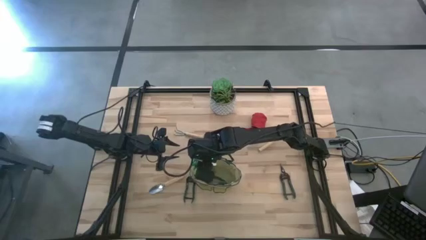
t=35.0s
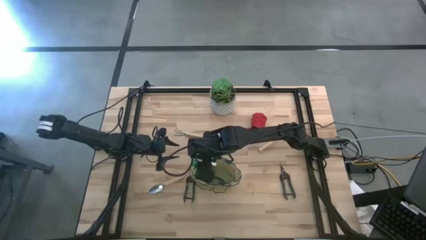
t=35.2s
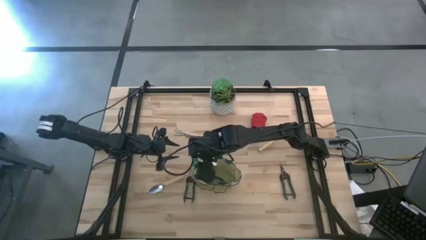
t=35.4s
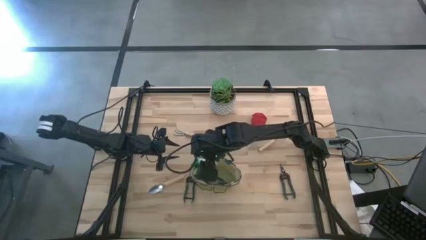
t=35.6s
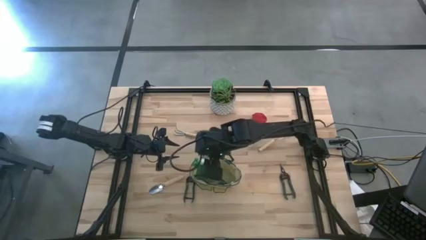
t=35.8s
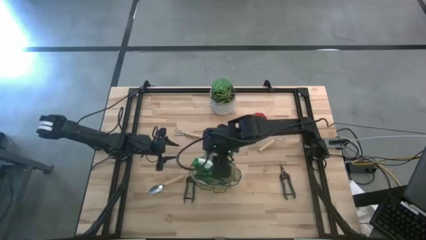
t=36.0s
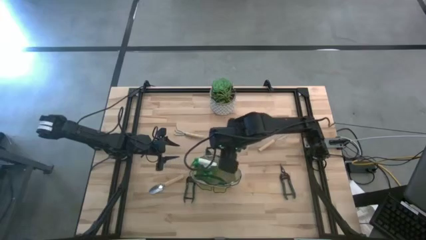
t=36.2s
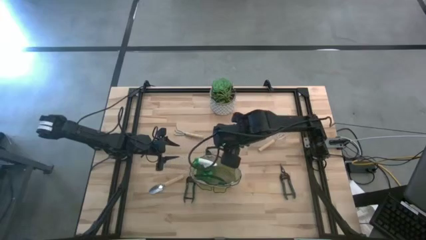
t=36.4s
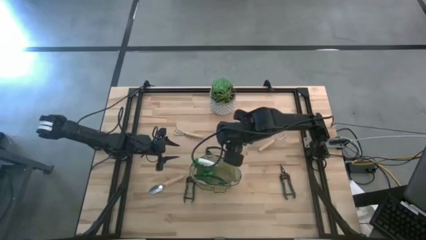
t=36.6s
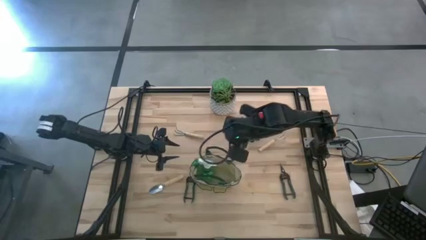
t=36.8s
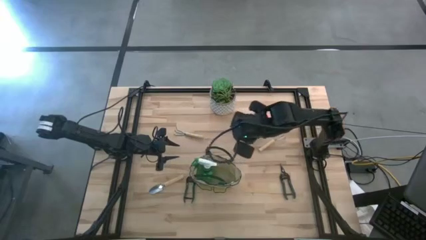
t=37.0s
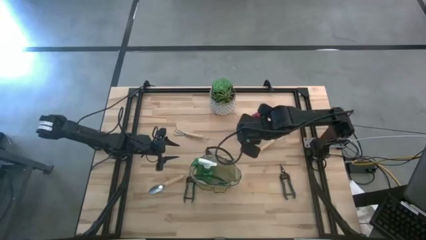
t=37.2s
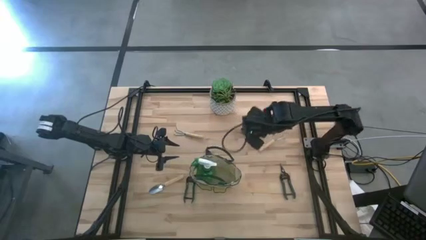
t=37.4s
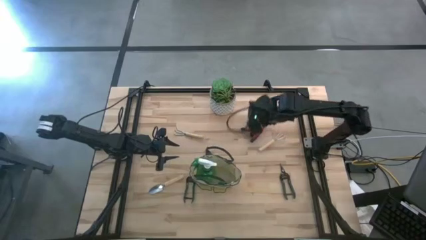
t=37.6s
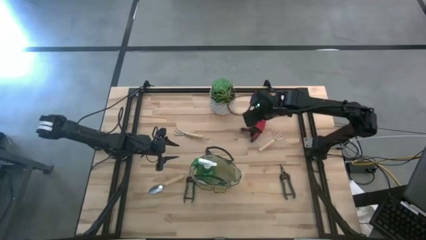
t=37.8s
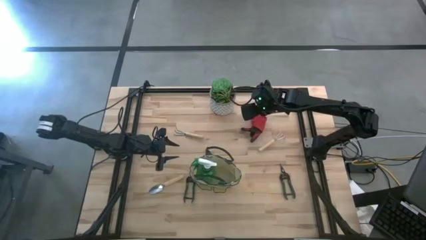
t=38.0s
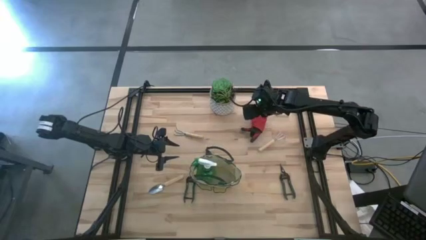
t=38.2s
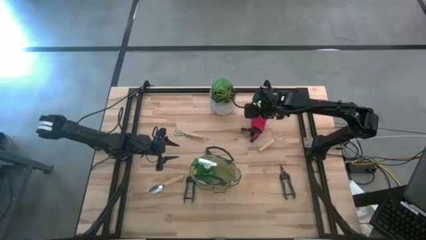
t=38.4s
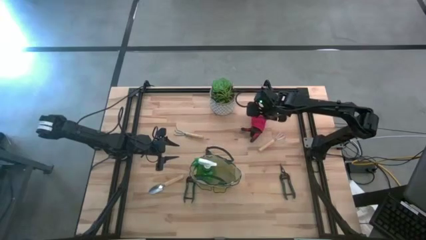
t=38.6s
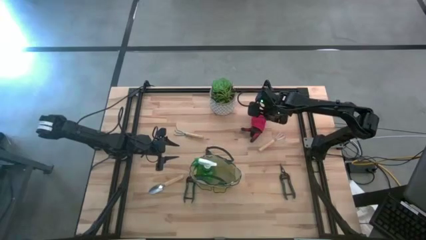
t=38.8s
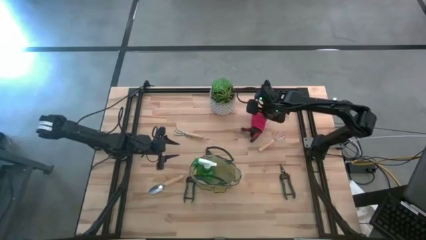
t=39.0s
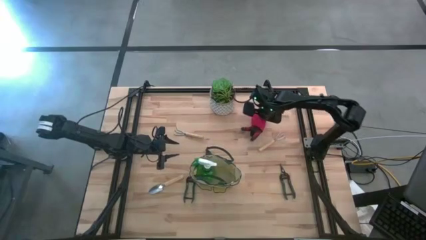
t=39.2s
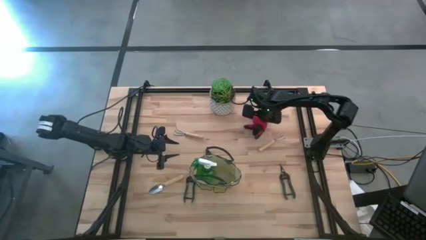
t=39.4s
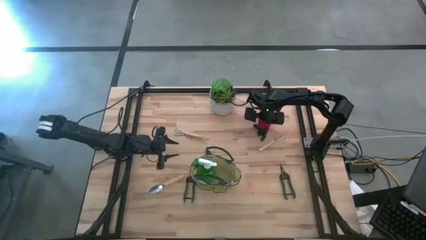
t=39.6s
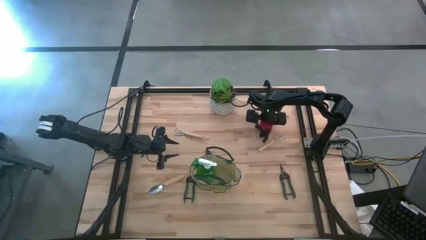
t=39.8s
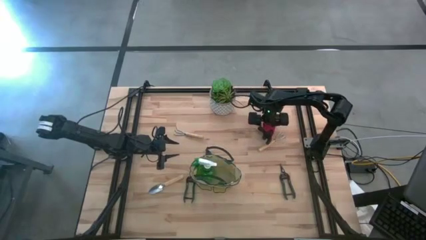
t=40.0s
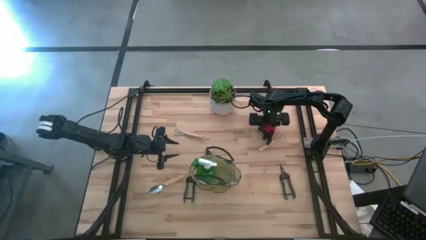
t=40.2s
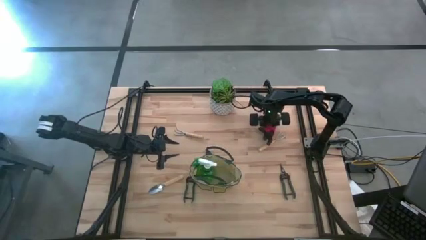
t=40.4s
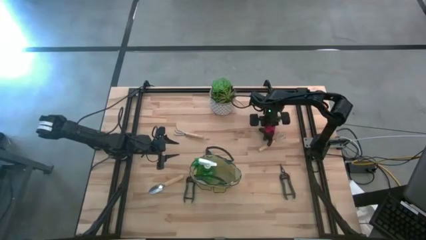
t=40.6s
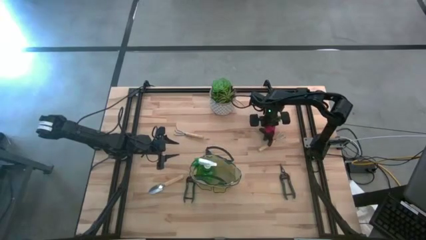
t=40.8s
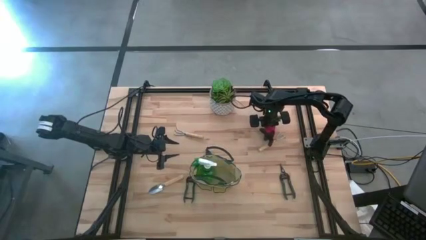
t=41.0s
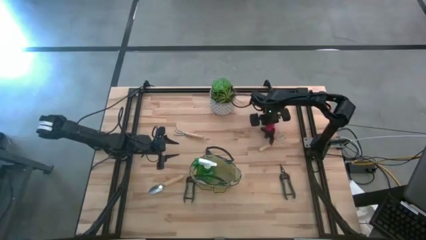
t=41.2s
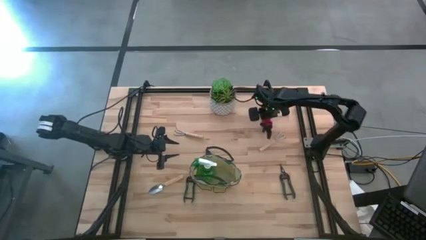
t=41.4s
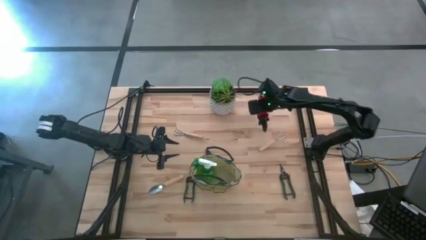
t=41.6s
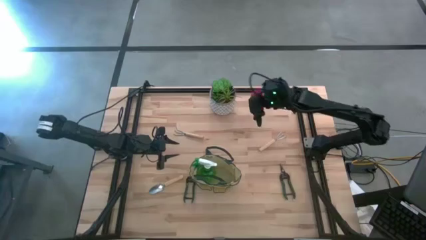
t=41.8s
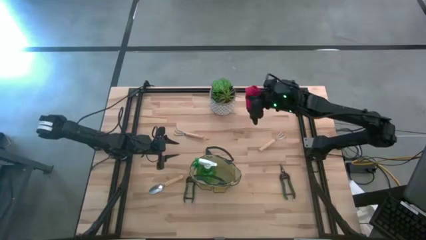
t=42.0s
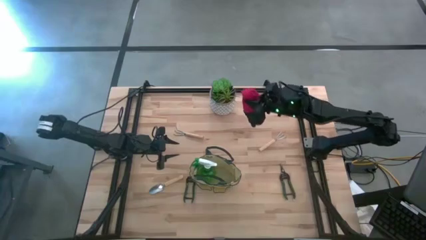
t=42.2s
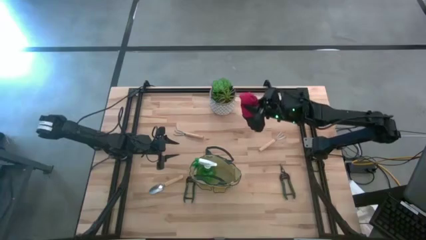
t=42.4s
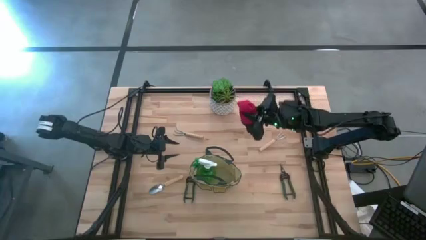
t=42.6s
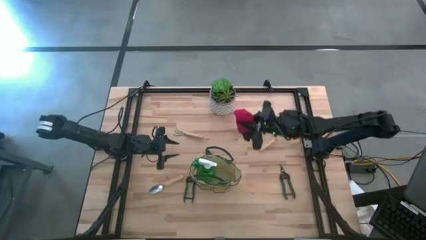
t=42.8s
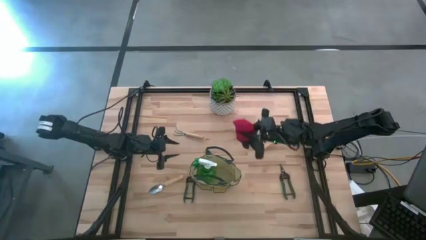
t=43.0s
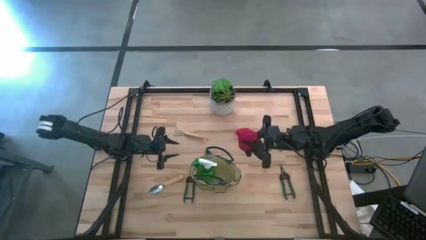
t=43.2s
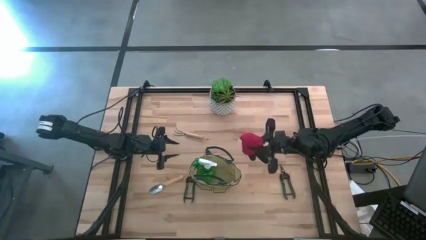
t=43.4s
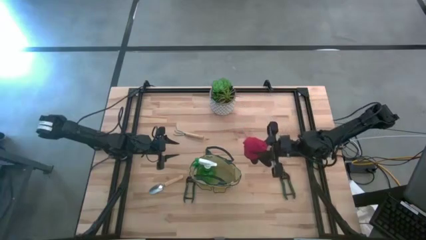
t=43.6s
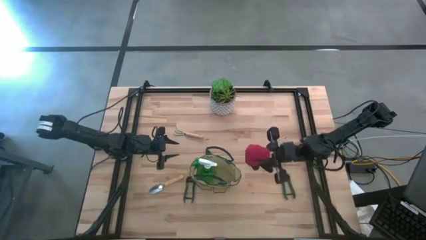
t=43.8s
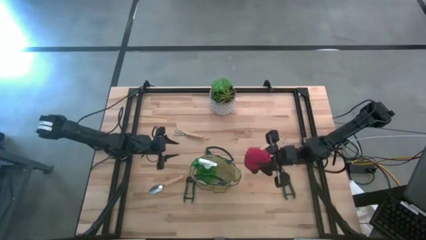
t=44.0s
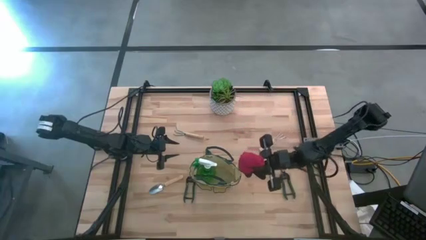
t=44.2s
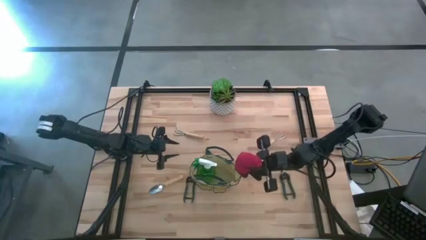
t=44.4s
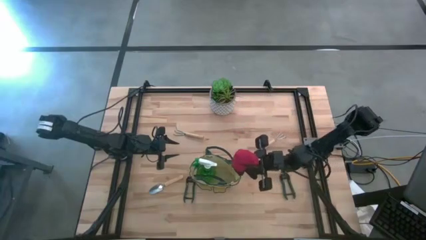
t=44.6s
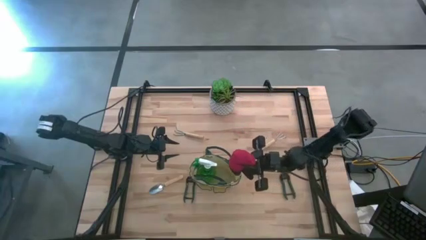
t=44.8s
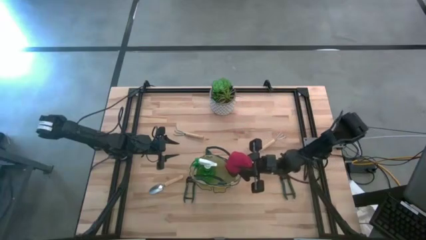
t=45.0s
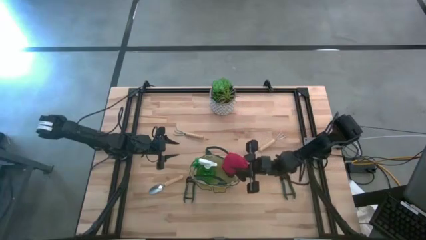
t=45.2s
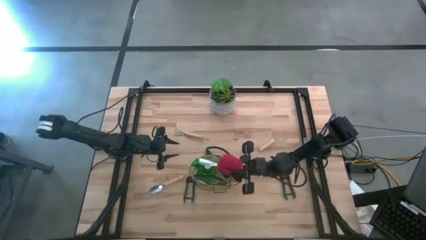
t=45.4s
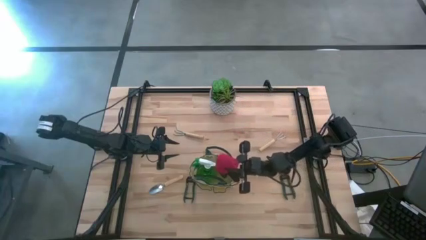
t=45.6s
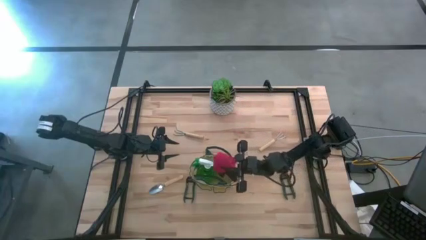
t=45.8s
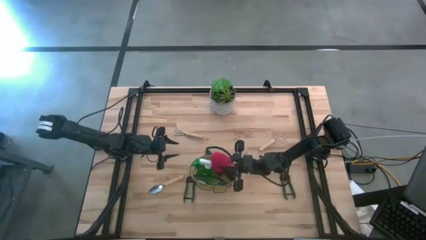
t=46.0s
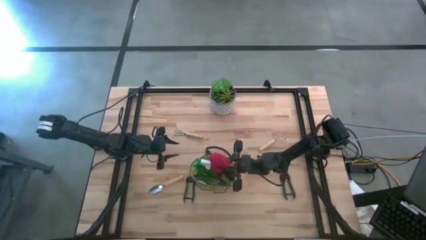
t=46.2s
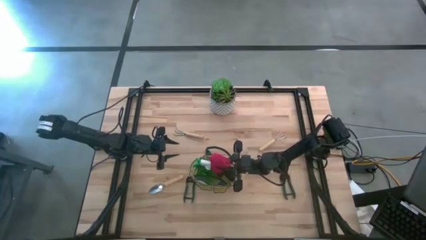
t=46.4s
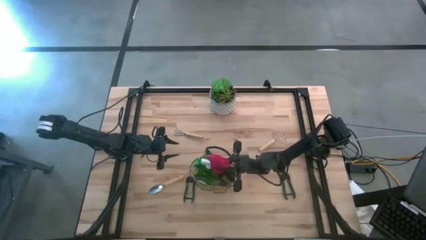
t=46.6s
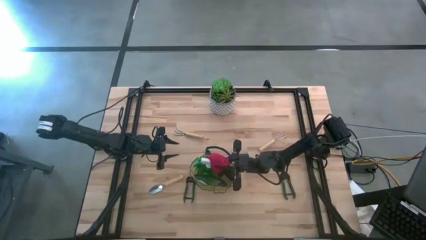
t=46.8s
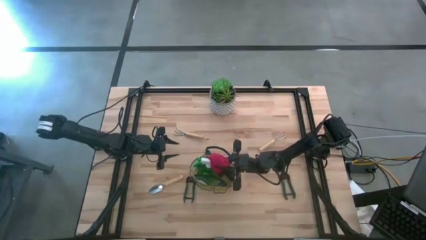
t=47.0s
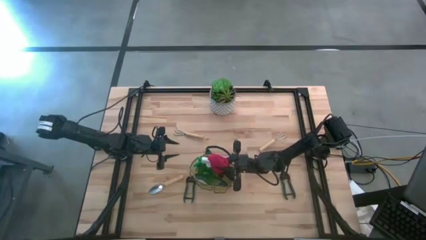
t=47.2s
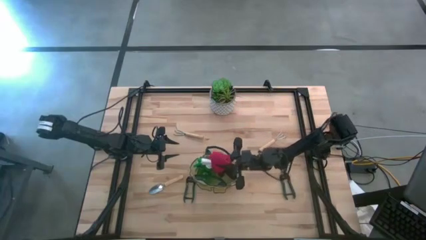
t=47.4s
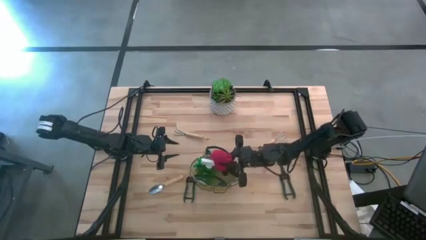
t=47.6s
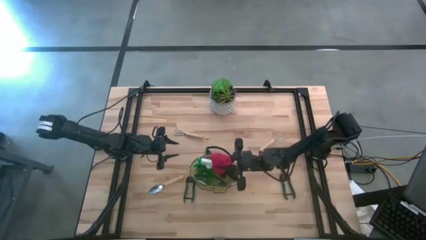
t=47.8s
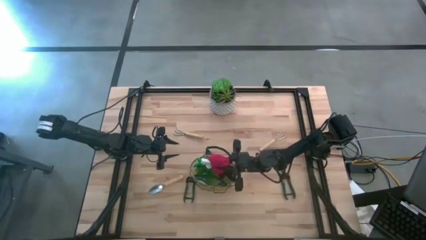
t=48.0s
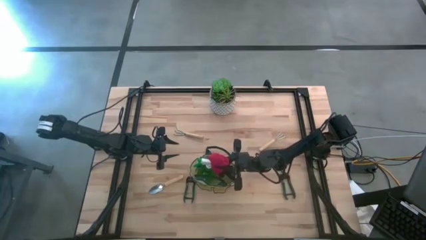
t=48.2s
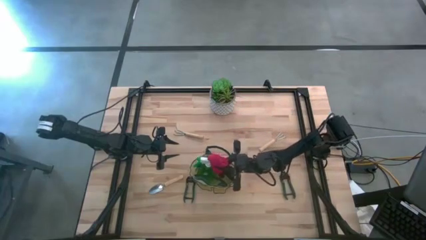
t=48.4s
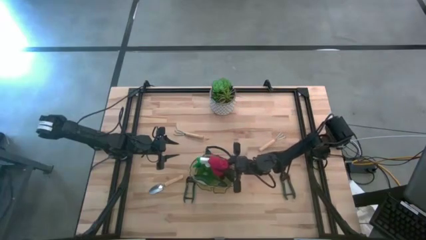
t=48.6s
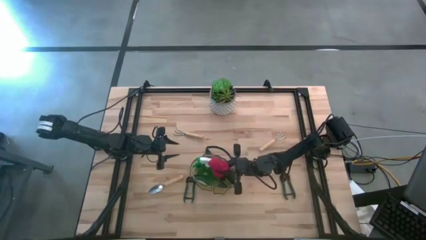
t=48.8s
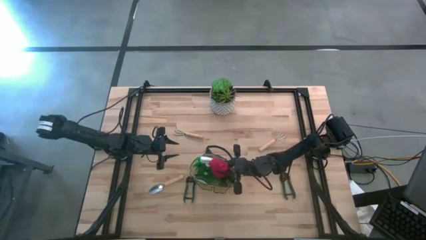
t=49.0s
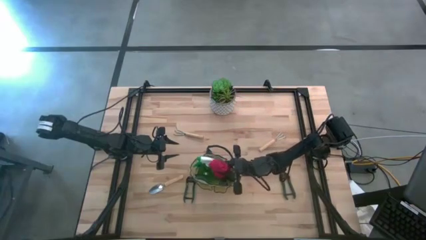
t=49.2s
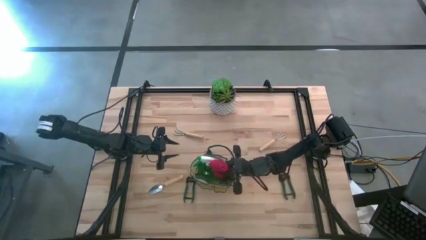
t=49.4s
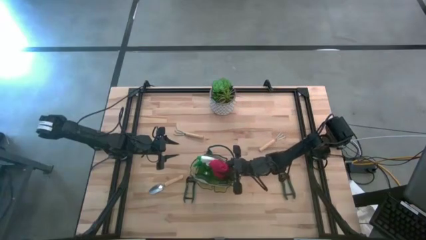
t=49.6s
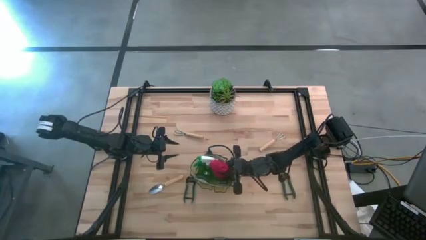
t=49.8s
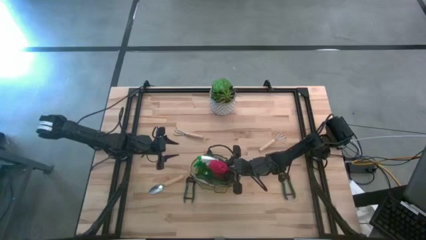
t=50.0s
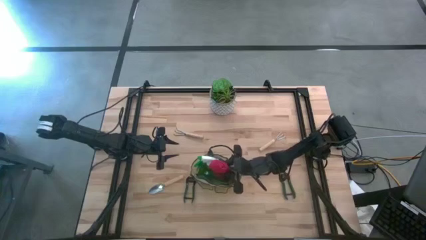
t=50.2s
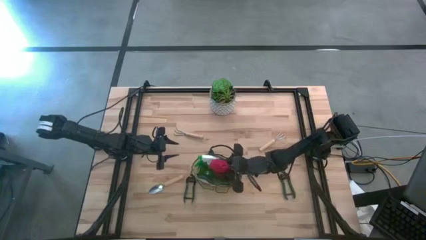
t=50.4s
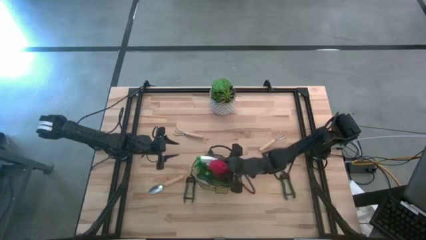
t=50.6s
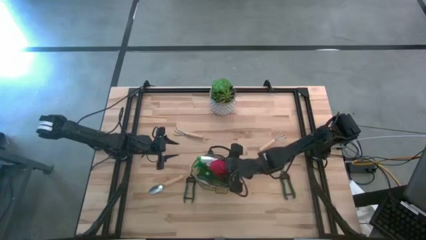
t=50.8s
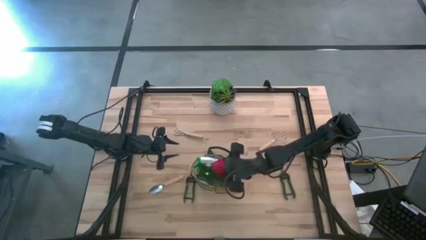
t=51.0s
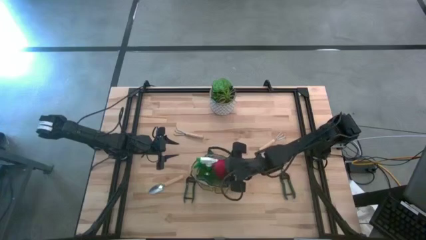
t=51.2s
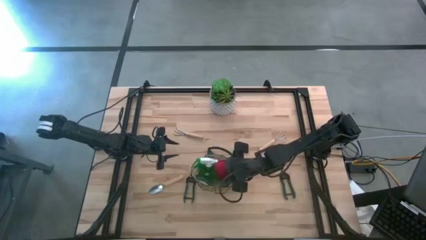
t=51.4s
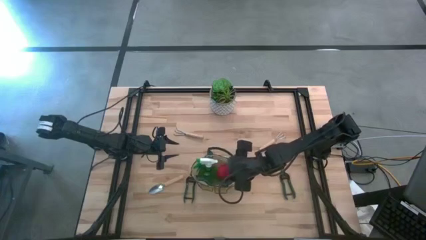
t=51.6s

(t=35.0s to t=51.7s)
Task: Pick & Place Garden tools in Gardening bag
Put the red gloves into the white gardening bag

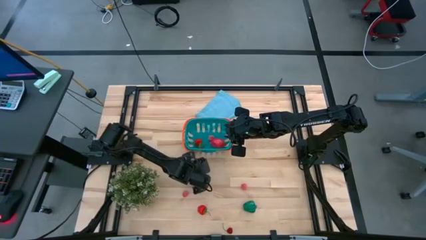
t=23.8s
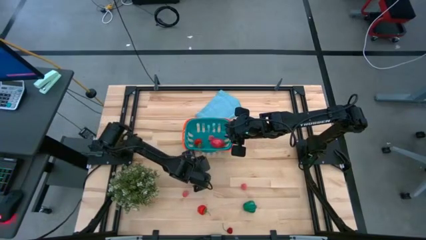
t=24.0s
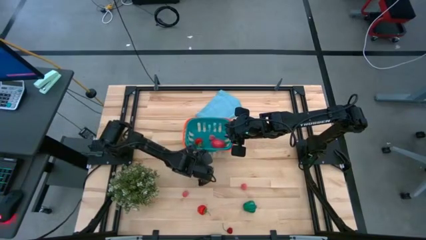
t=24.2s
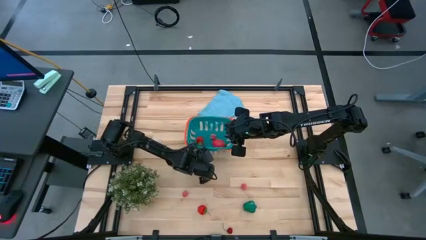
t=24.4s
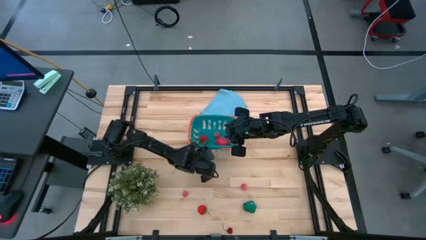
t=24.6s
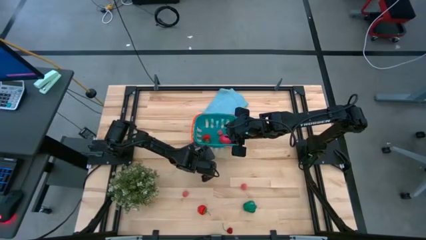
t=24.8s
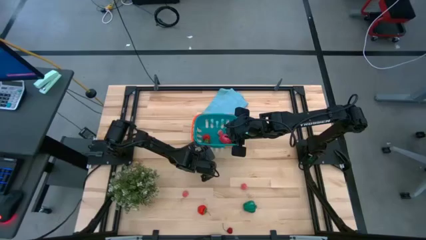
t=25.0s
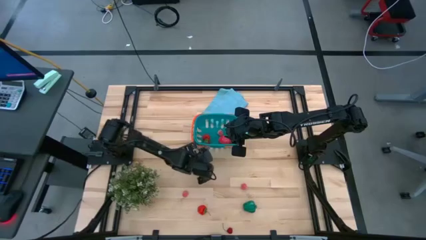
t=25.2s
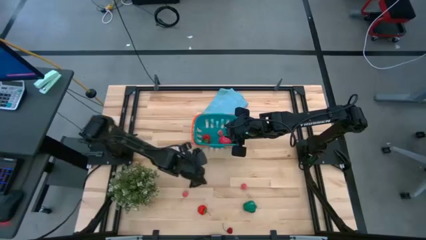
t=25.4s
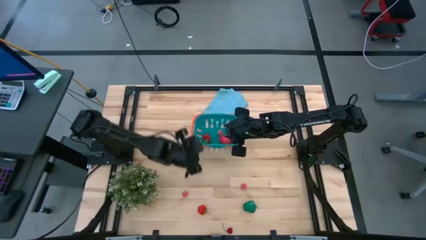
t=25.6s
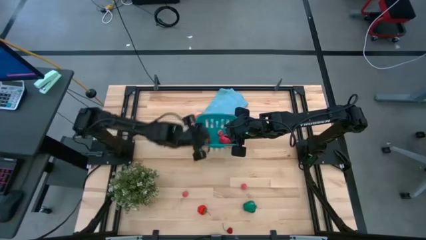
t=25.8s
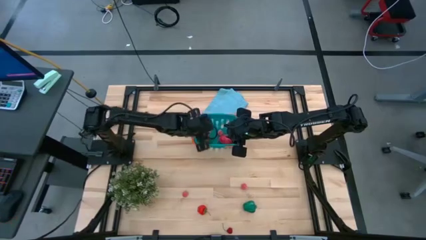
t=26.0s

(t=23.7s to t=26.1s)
Task: Pick and placing Produce into tupperware
Put the pink peach into the bin
